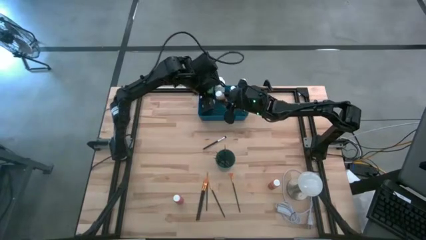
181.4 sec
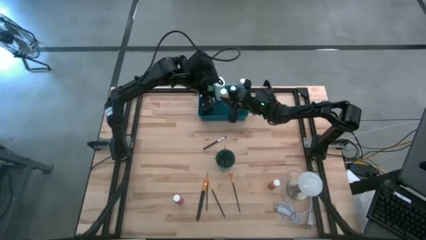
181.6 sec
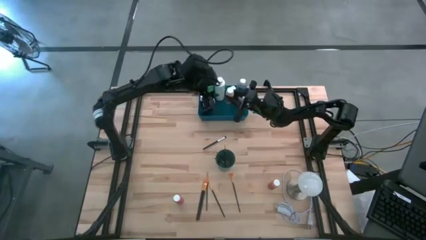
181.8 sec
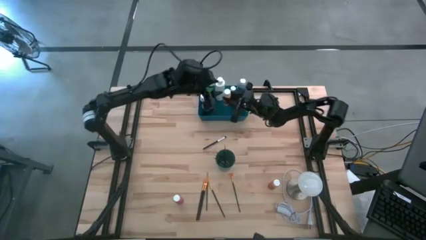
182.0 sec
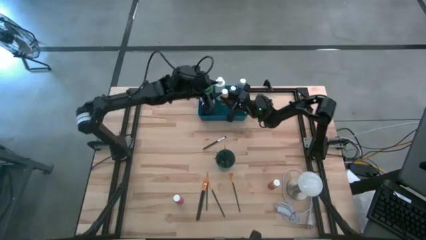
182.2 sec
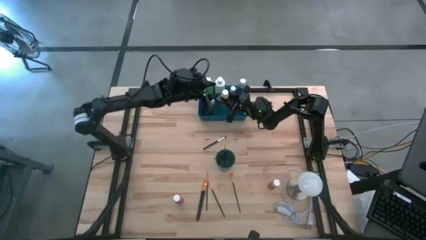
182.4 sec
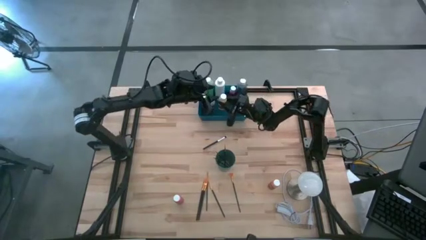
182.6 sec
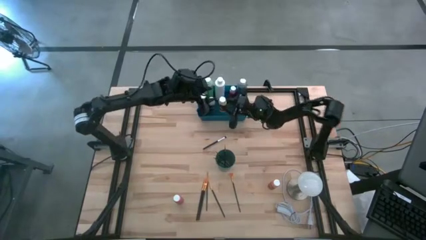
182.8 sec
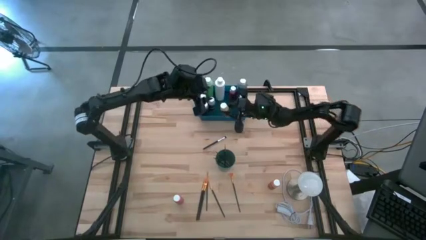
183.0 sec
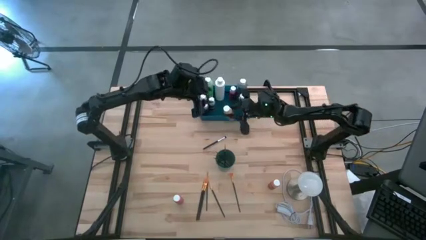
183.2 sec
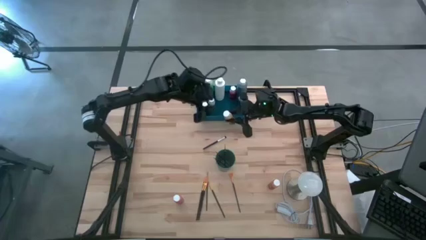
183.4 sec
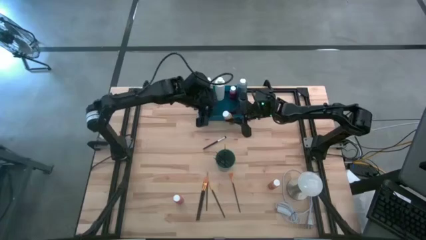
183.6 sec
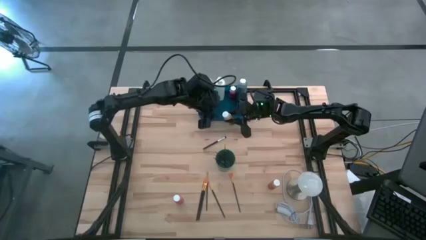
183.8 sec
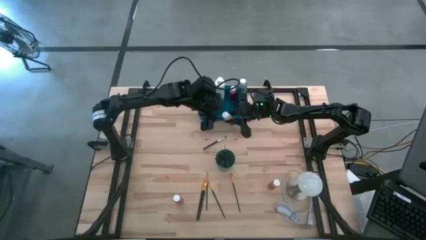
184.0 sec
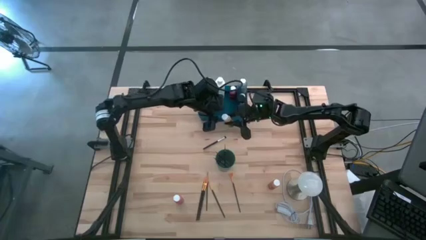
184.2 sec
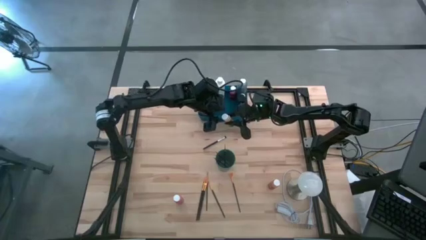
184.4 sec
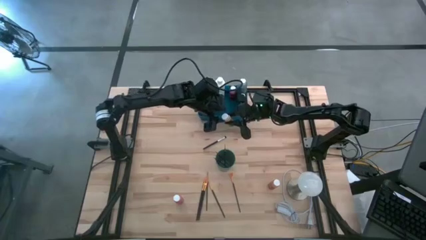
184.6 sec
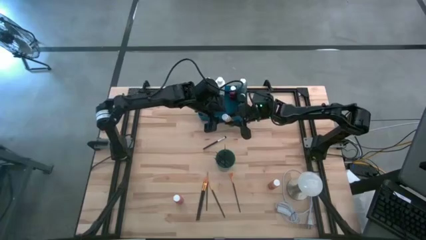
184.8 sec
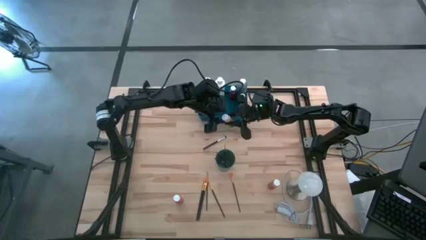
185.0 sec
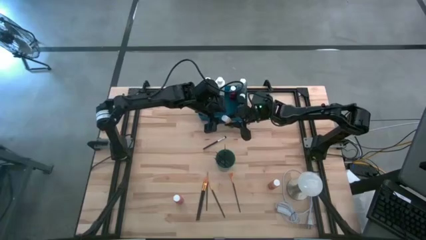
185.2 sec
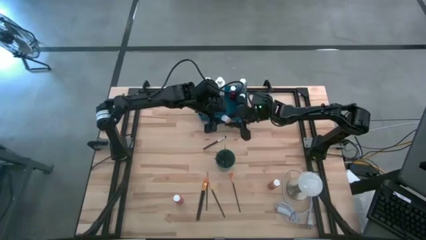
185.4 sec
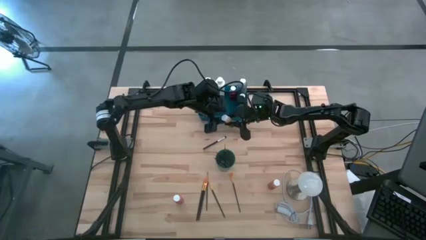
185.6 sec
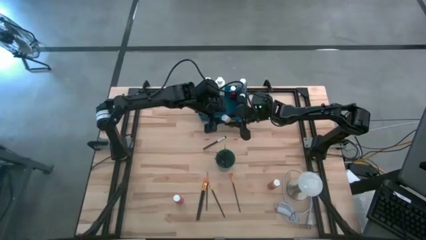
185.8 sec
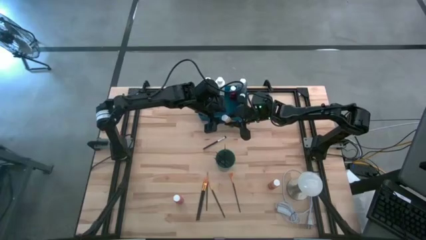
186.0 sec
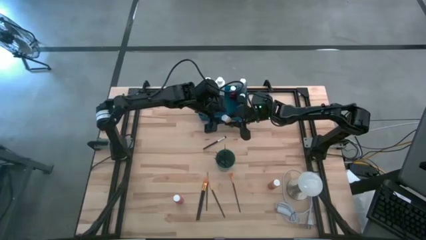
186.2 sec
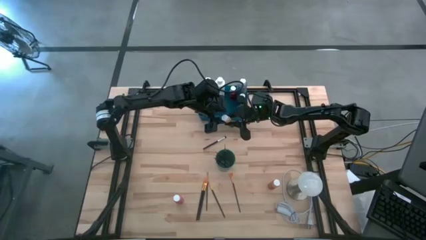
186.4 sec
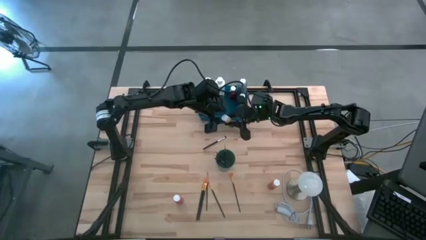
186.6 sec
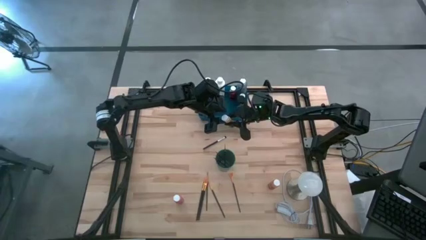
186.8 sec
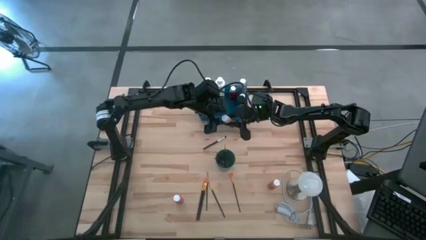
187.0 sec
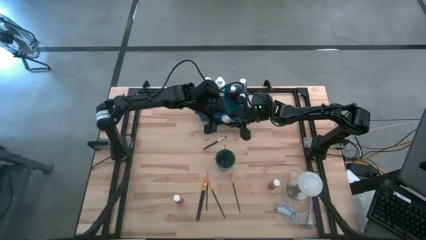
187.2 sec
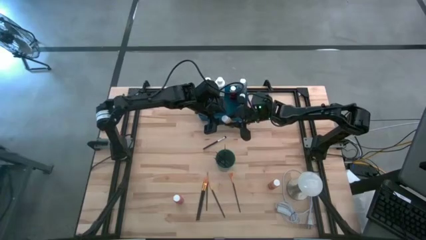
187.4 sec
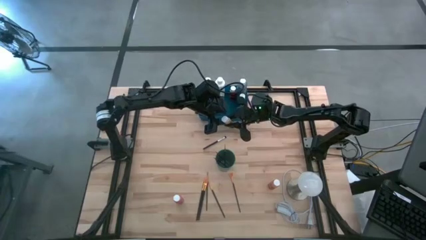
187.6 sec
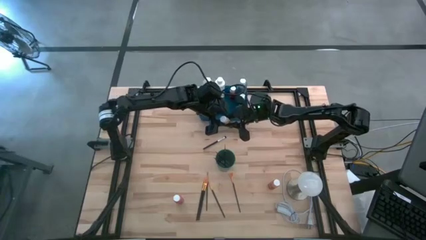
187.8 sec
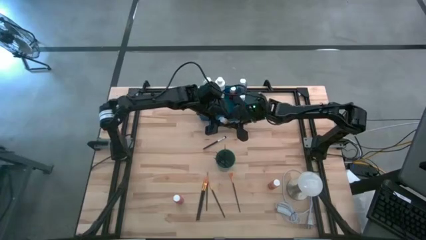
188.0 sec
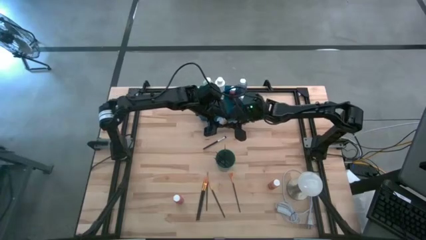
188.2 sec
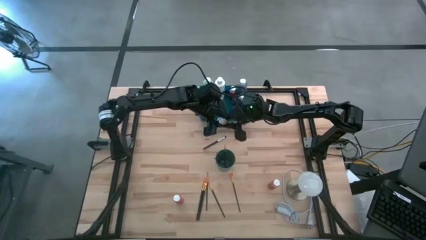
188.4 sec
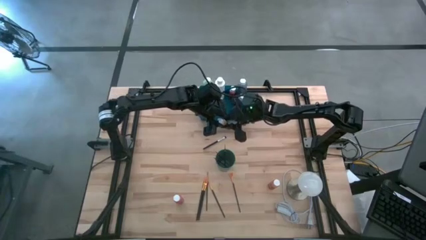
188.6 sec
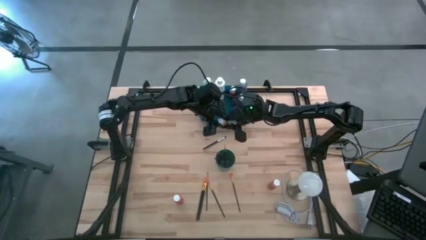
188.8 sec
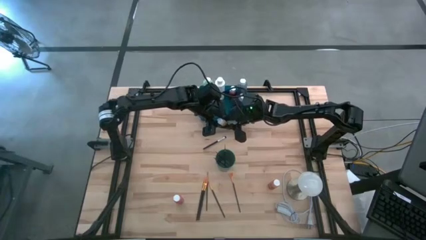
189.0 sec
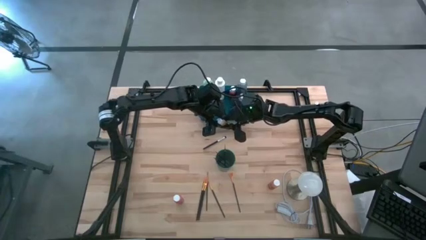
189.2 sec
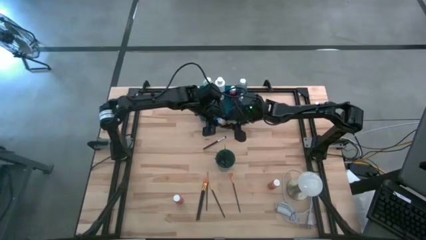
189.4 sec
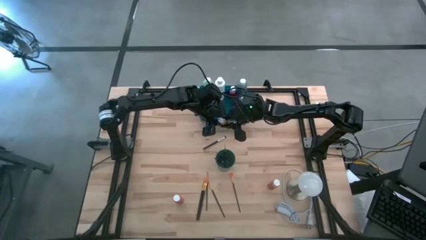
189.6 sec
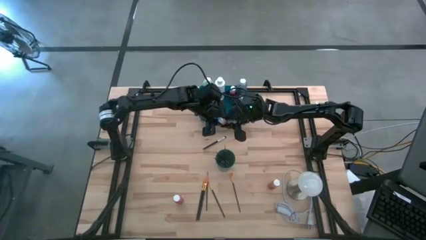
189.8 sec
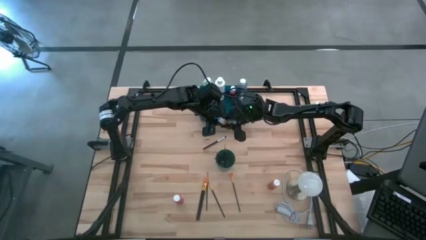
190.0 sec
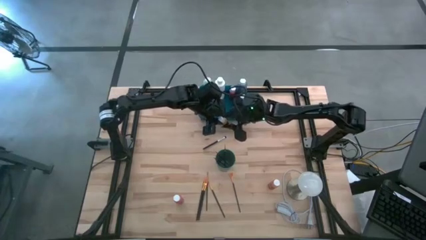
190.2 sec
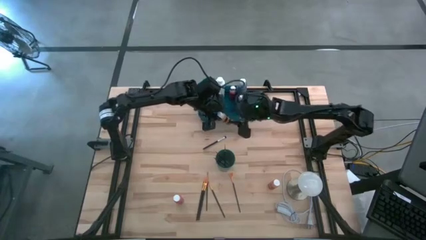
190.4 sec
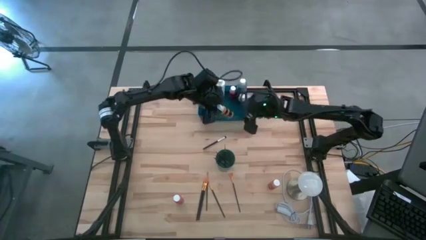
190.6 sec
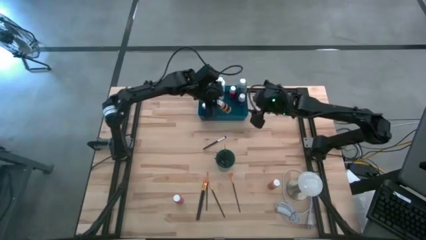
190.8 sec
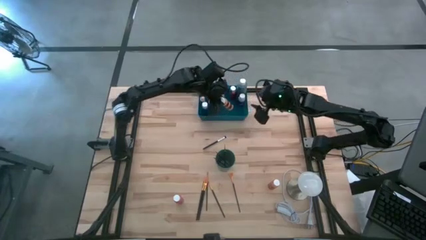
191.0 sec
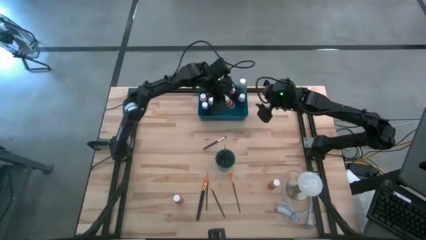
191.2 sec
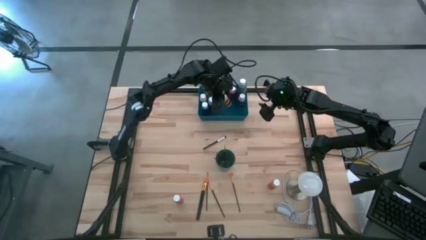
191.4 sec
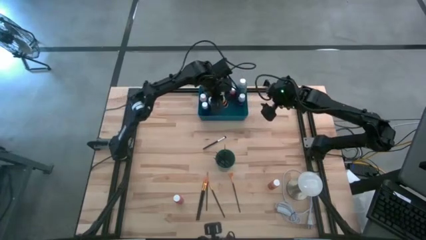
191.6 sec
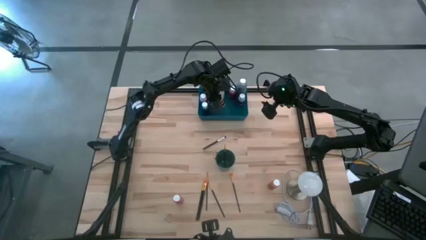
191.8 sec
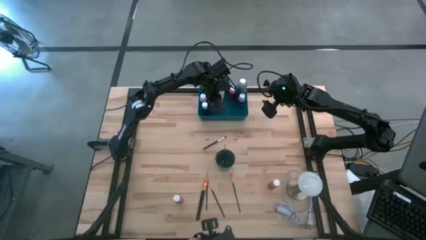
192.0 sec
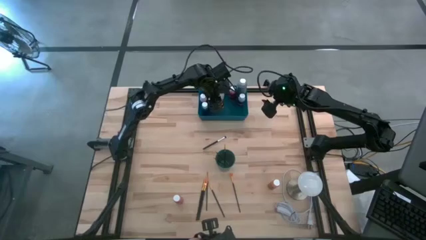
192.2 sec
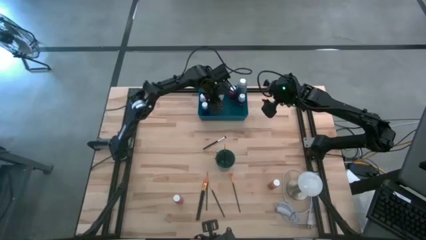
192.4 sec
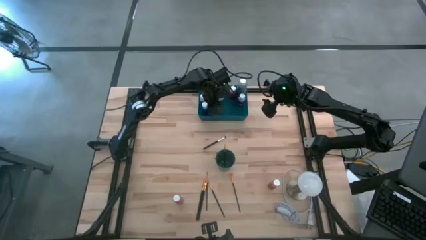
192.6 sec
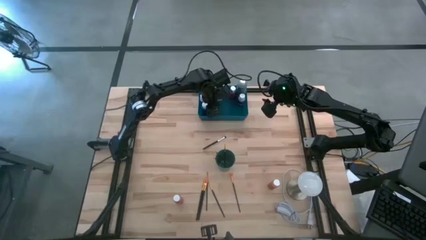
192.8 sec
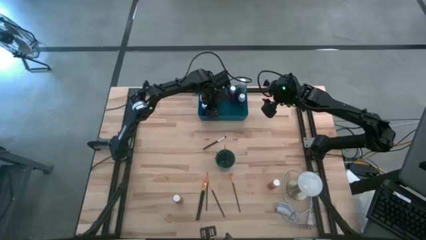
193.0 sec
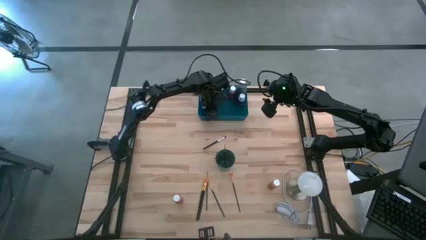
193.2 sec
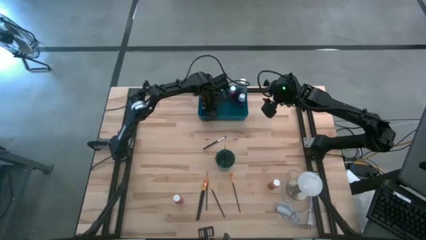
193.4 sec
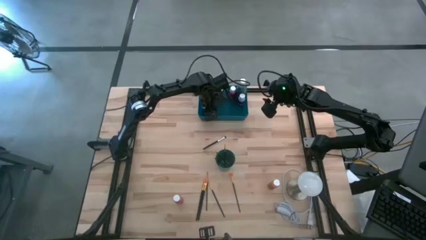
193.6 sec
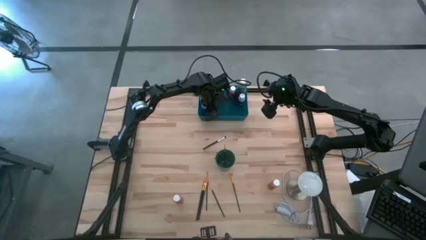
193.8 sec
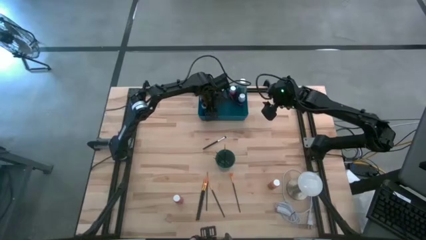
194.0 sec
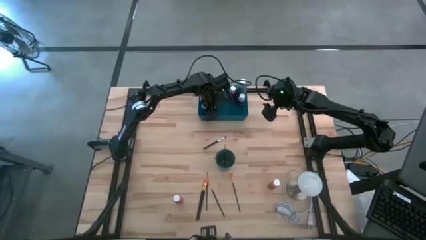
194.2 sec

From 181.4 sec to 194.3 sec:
Task: Pick & Place Paint Supplies
Put the yellow paint bottle into the blue bin
